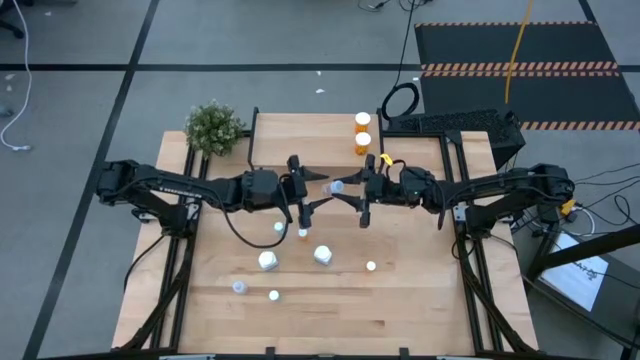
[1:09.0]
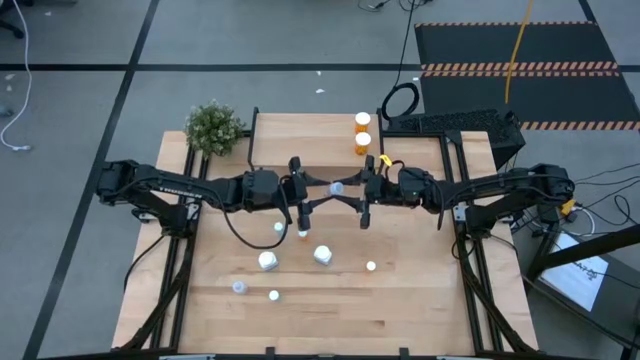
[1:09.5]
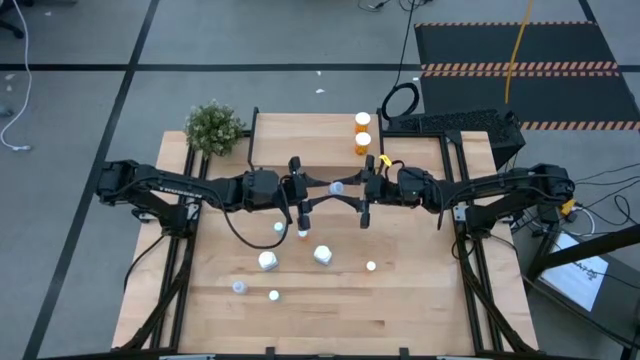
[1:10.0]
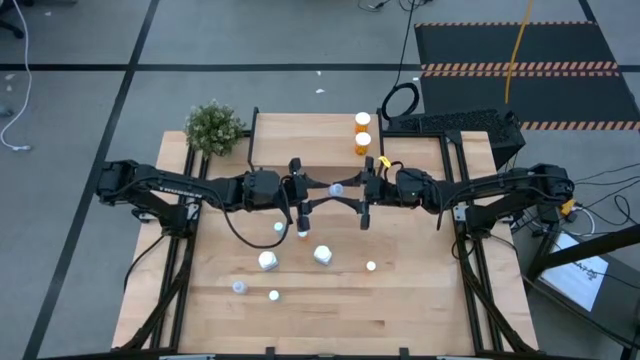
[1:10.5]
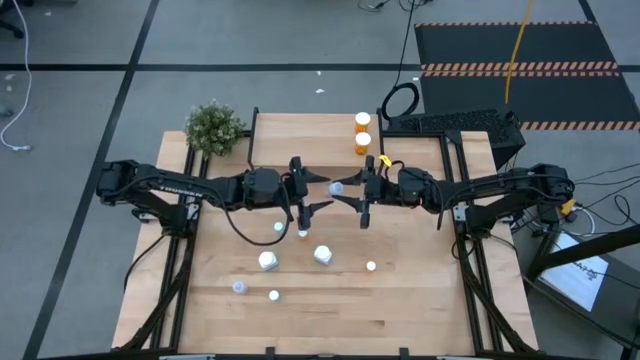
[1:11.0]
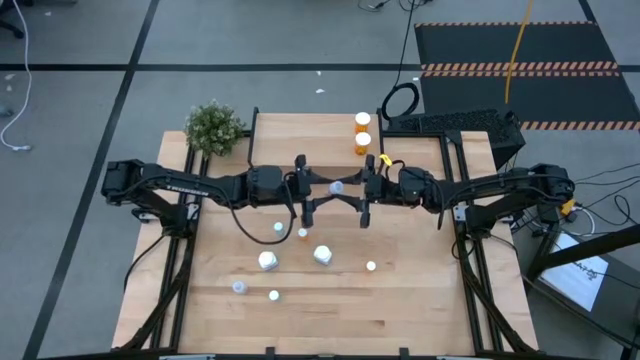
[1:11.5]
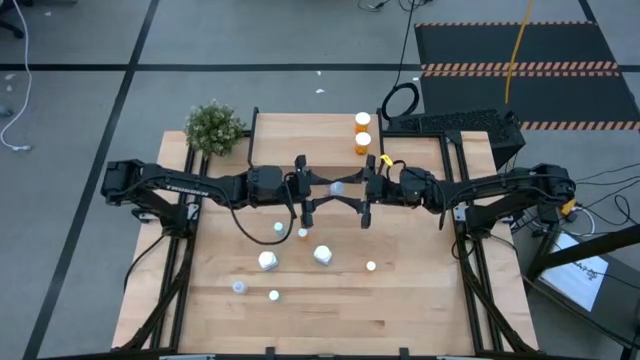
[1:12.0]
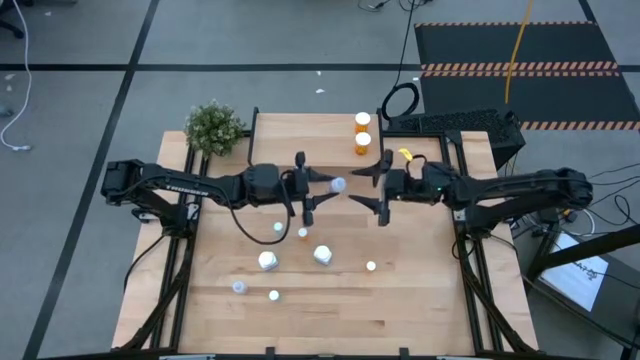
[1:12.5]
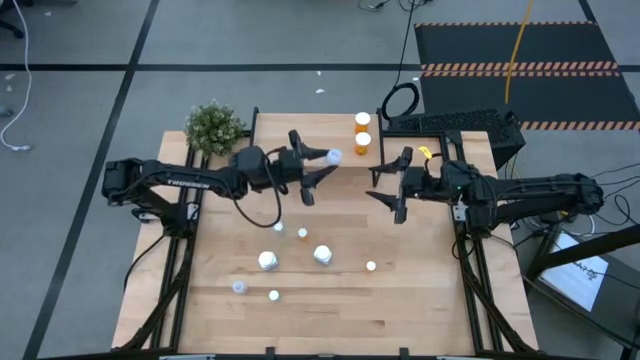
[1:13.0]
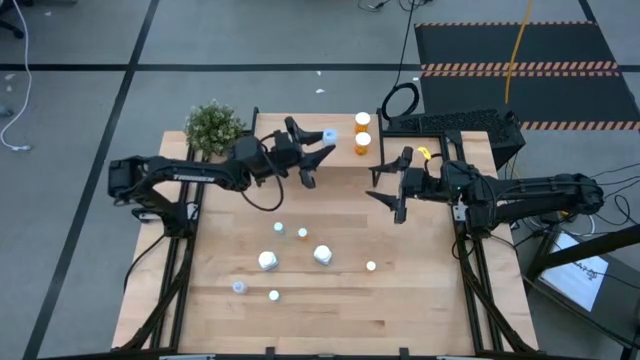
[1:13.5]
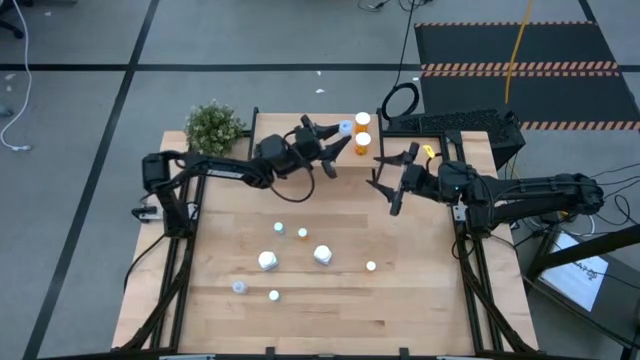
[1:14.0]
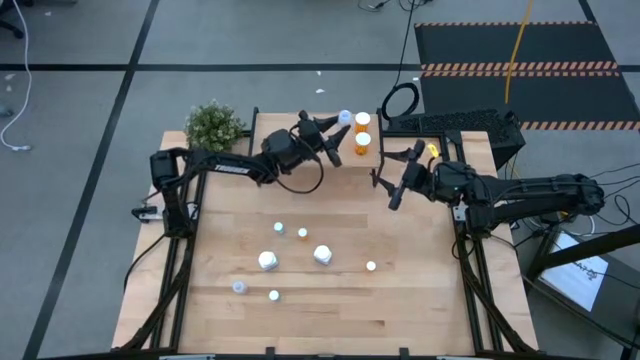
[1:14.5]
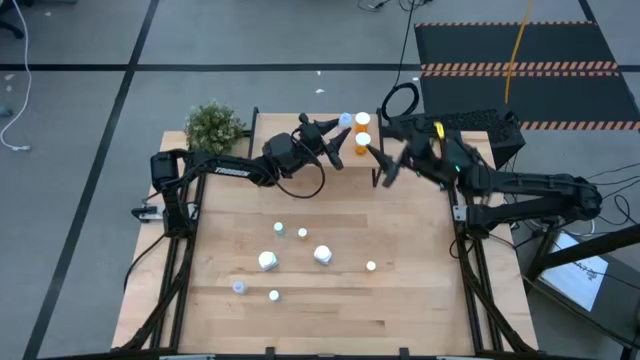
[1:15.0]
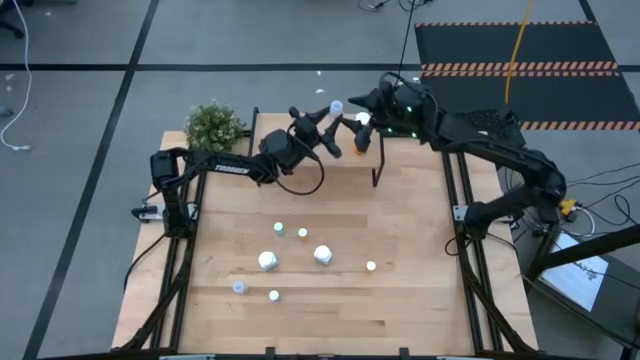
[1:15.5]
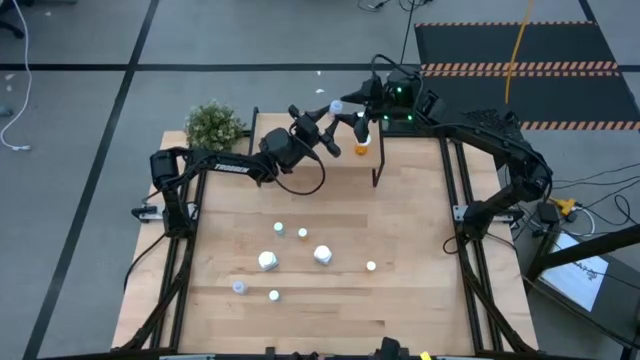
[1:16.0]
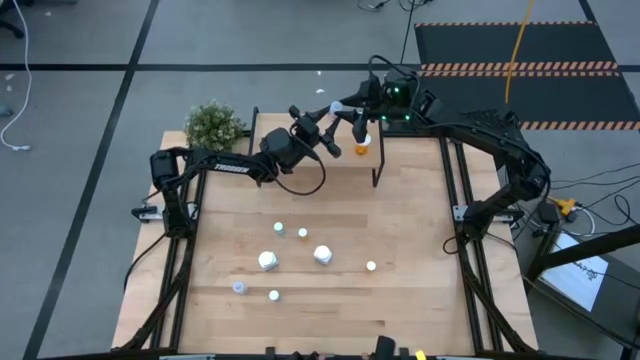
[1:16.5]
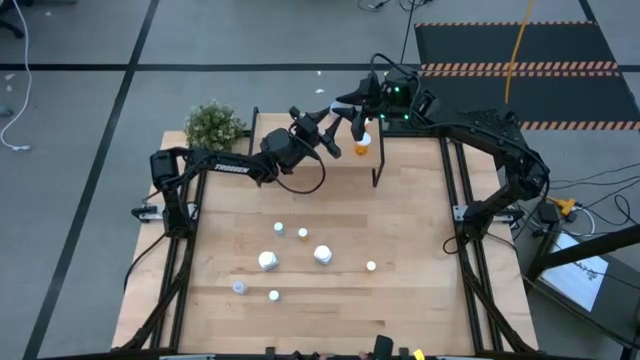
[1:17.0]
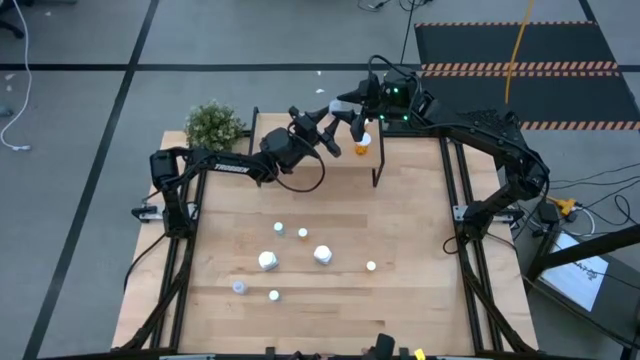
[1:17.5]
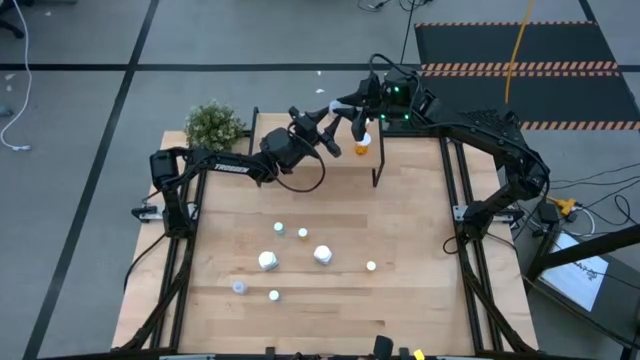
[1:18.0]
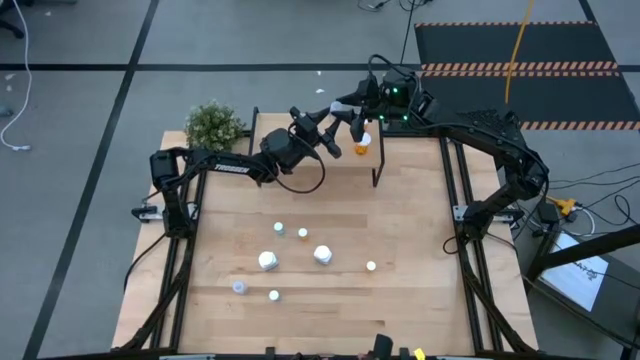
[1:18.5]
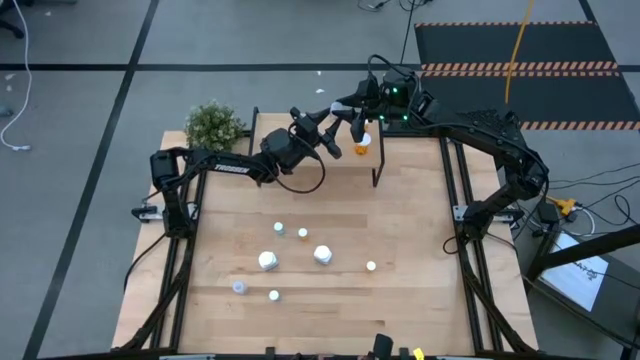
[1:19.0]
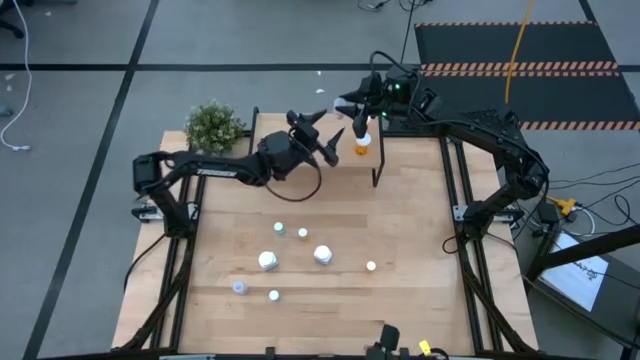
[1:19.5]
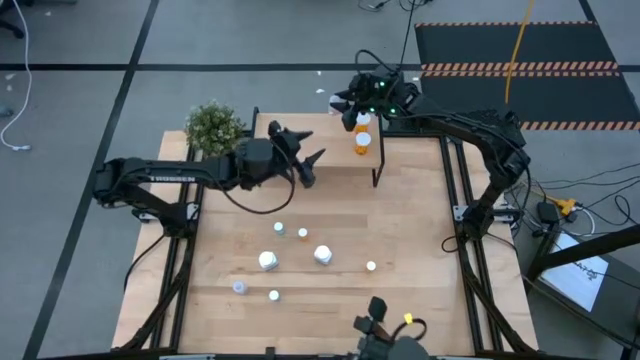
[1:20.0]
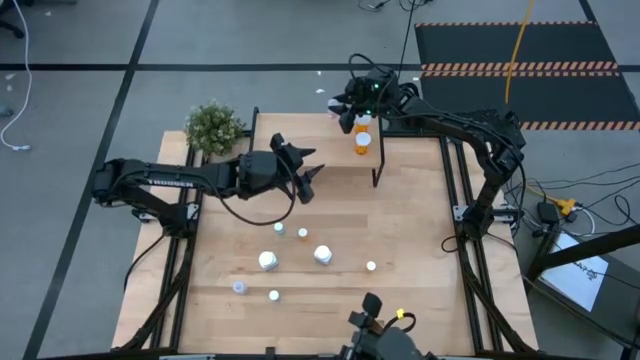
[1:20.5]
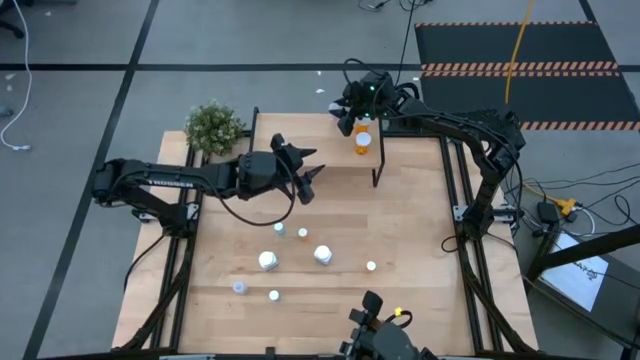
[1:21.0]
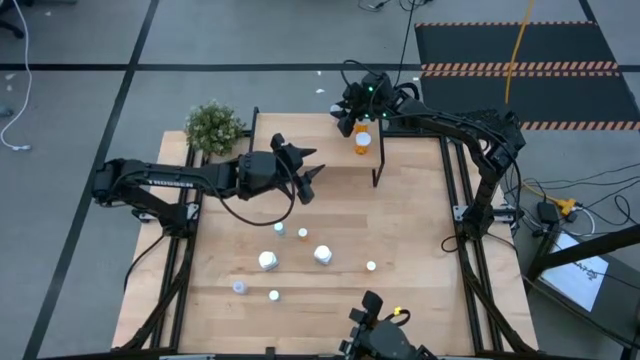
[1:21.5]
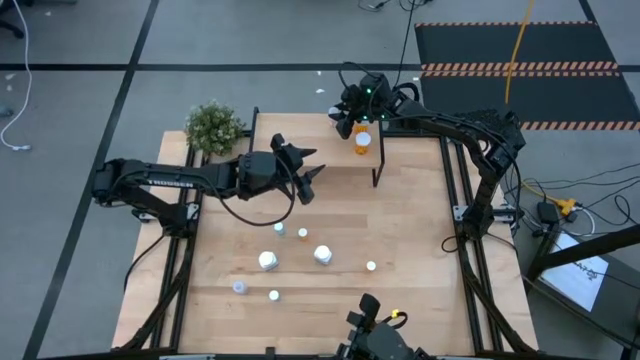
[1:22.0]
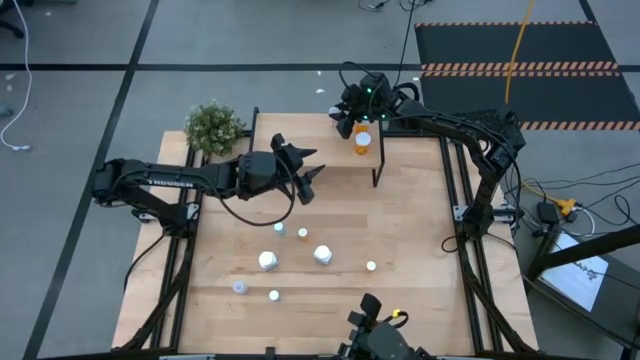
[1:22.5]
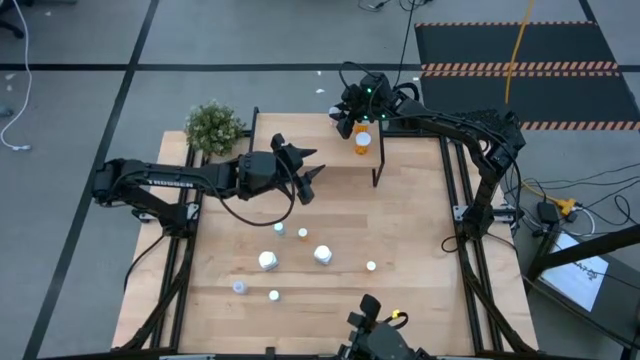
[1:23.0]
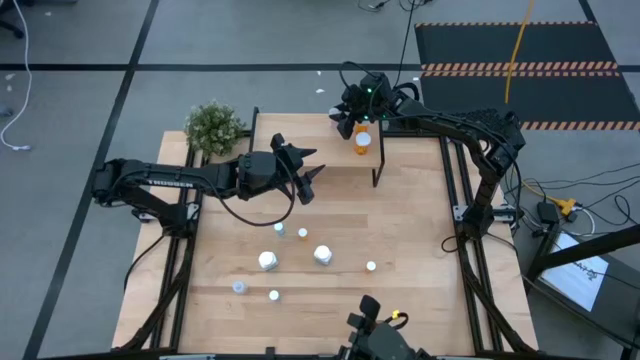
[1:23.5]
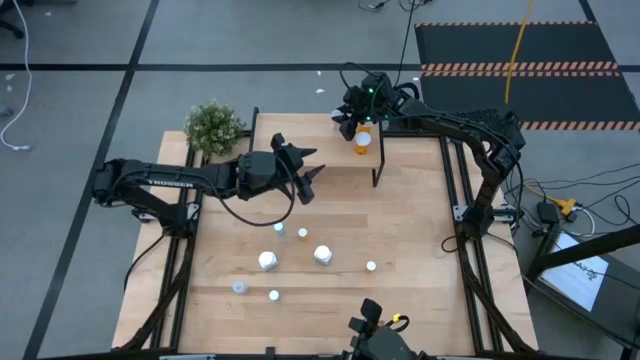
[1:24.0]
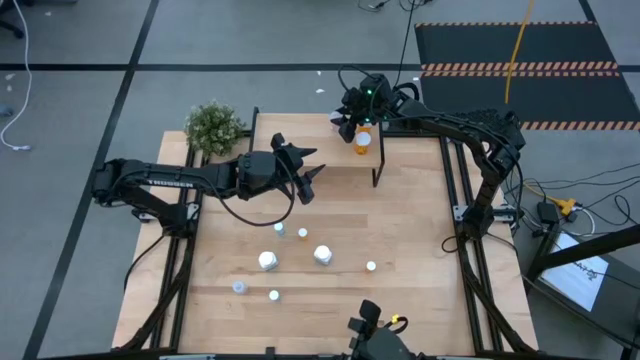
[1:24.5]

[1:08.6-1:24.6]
Task: Pick and place medicine bottles onto shelf by color
Put the top transparent pill bottle on the shelf

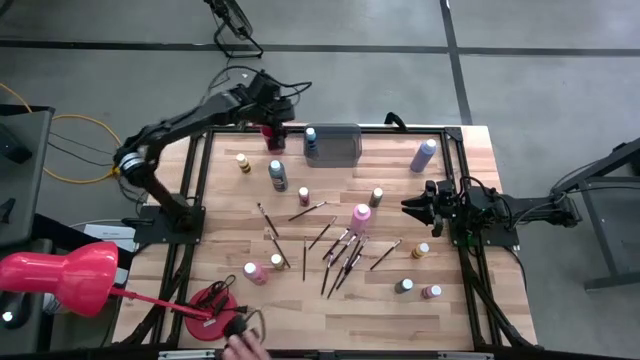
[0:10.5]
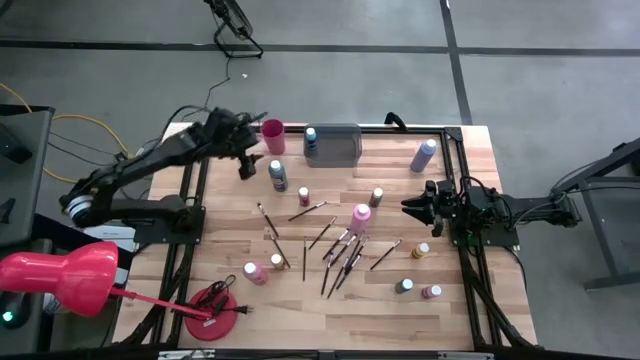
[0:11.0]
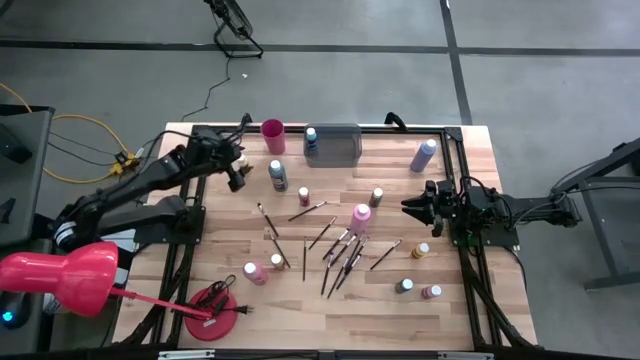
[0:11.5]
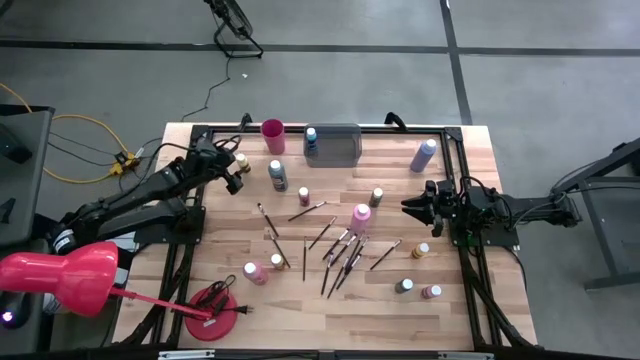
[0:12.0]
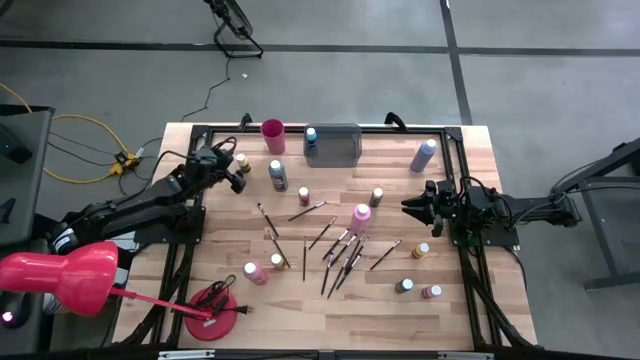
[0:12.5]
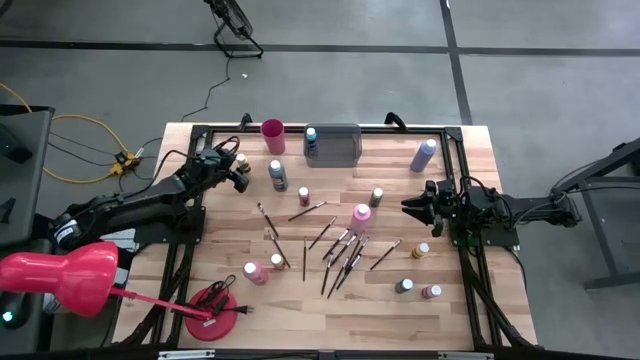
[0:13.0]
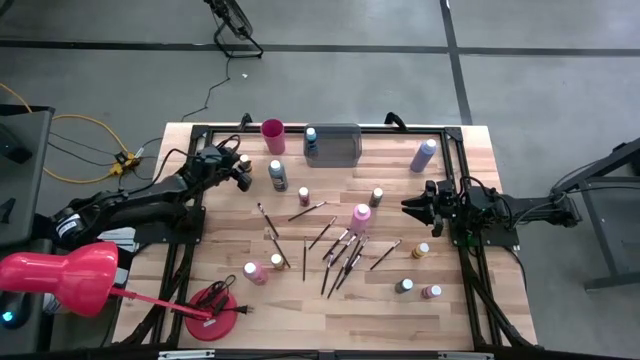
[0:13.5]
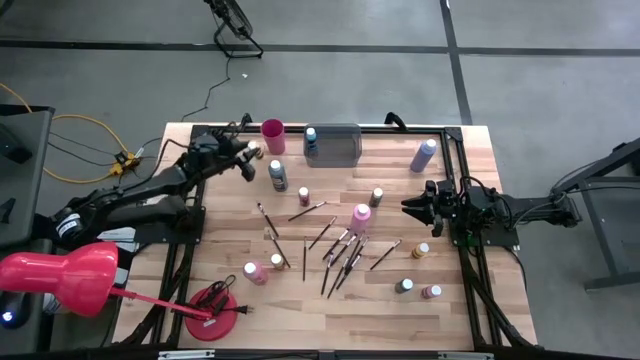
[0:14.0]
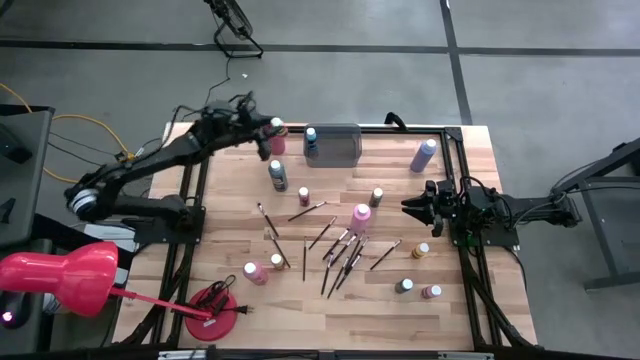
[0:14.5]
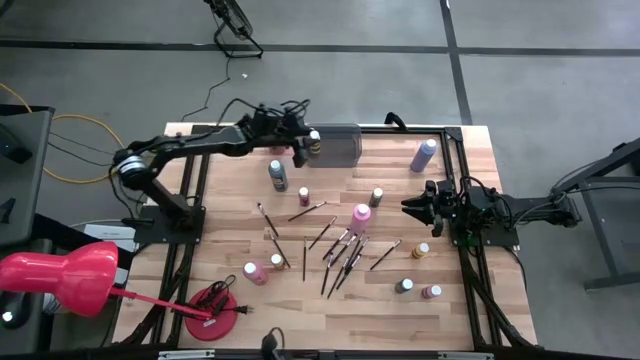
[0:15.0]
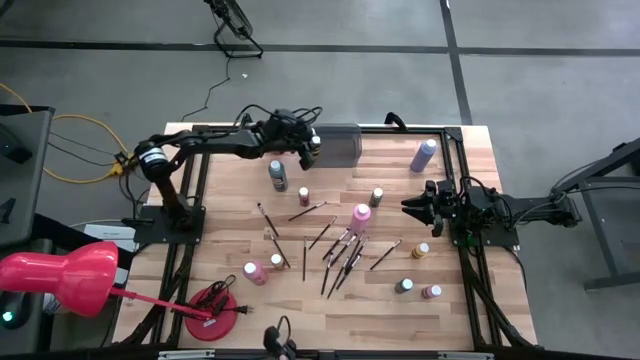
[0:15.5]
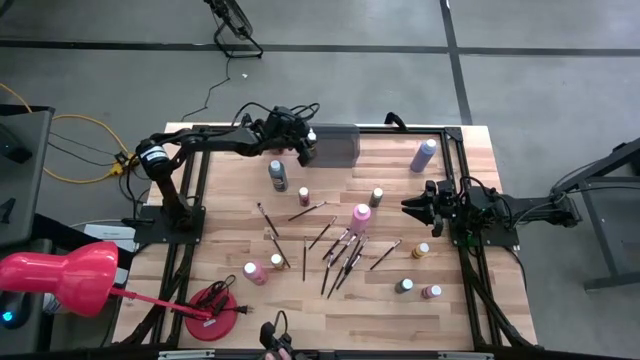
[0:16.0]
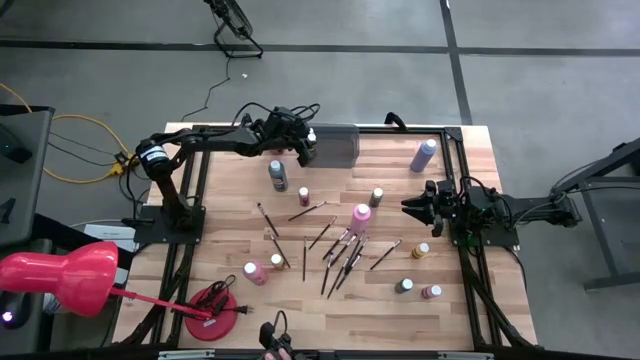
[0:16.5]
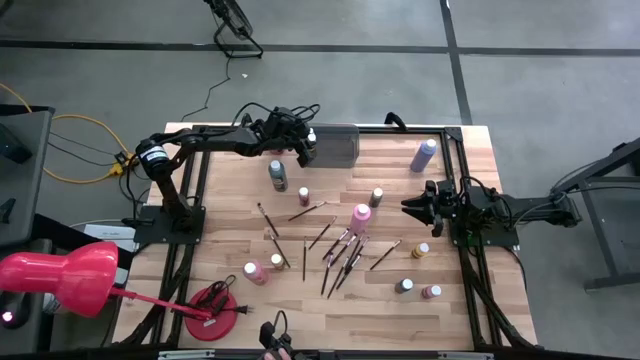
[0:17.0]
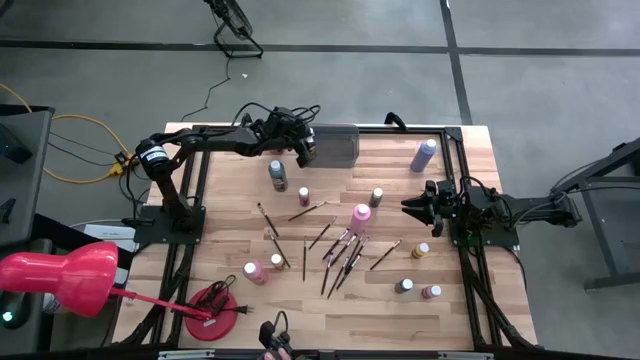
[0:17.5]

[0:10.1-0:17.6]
Task: Pick & Place Paint Supplies
Put the small light yellow paint bottle into the black bin
